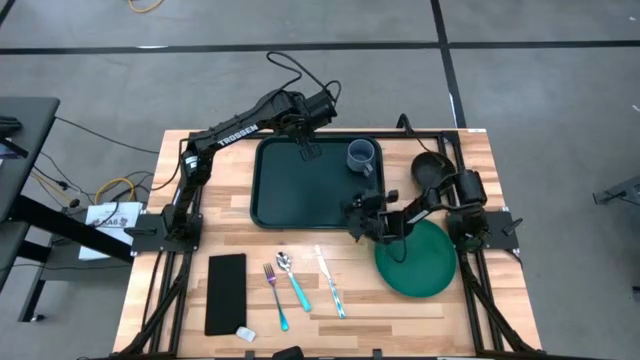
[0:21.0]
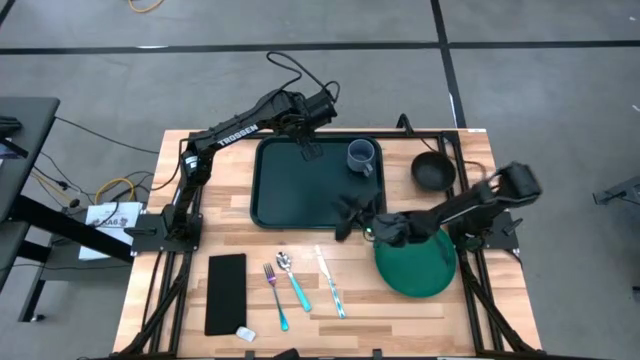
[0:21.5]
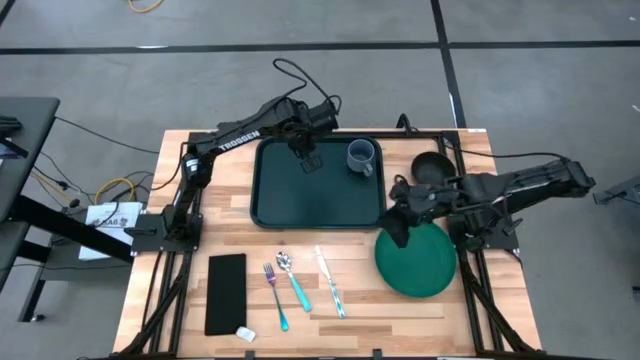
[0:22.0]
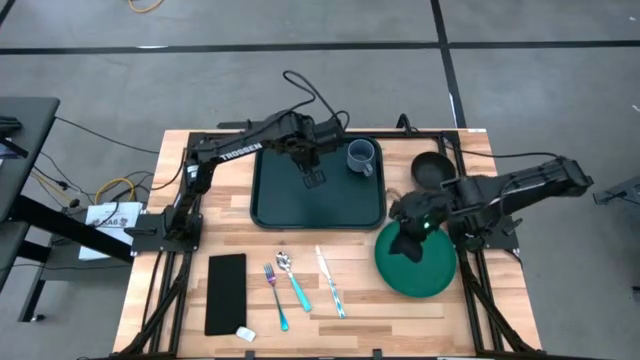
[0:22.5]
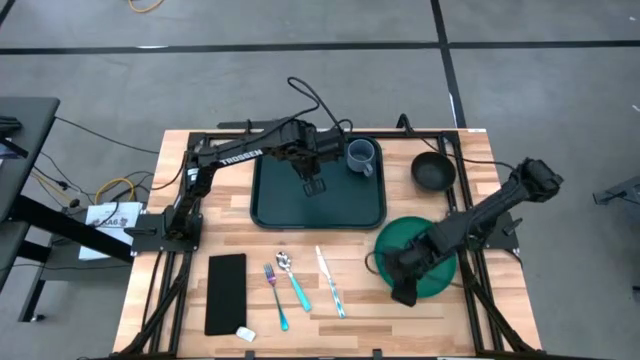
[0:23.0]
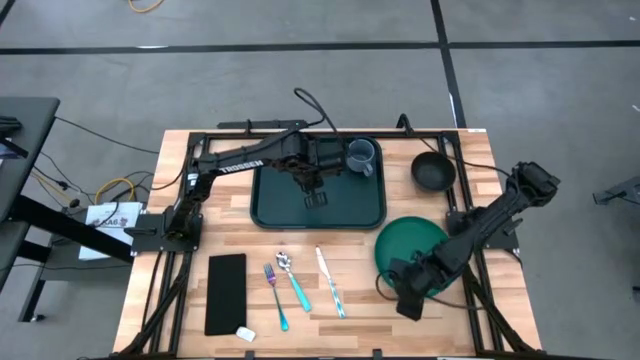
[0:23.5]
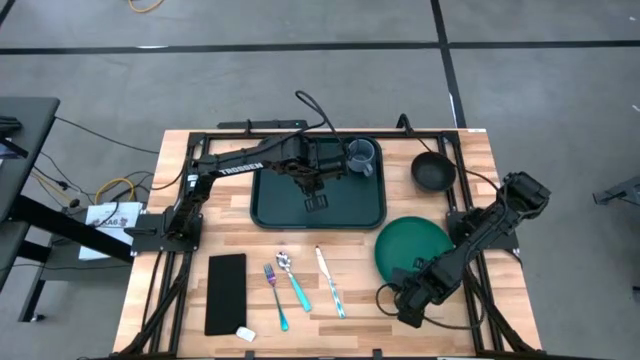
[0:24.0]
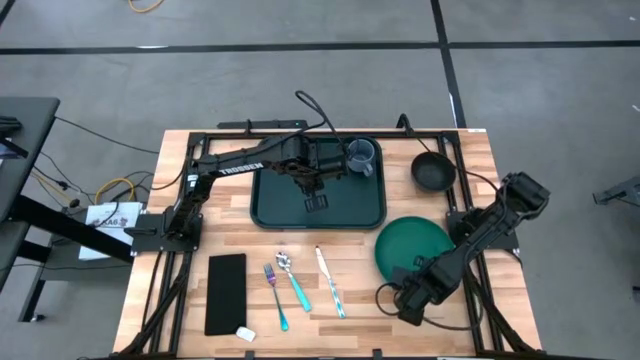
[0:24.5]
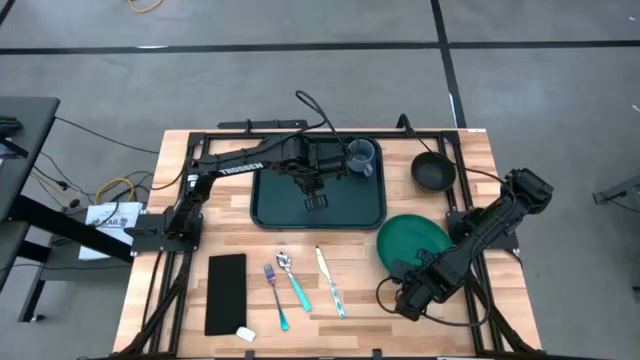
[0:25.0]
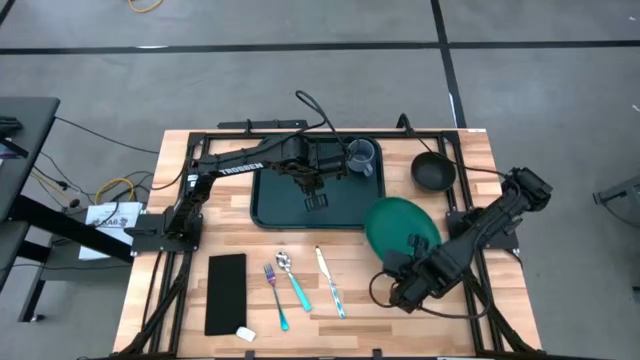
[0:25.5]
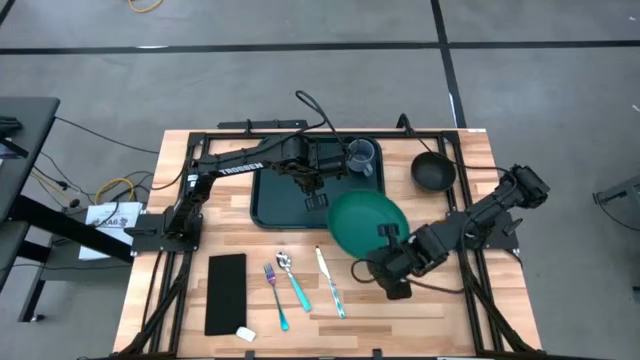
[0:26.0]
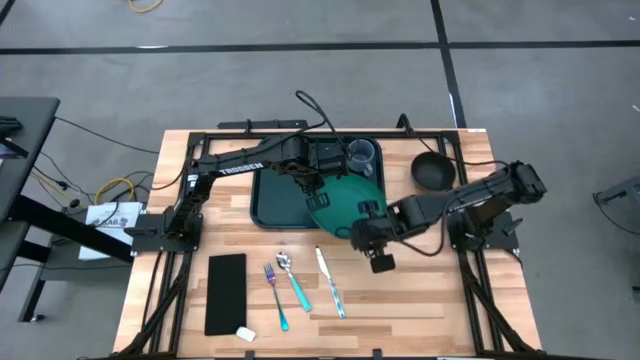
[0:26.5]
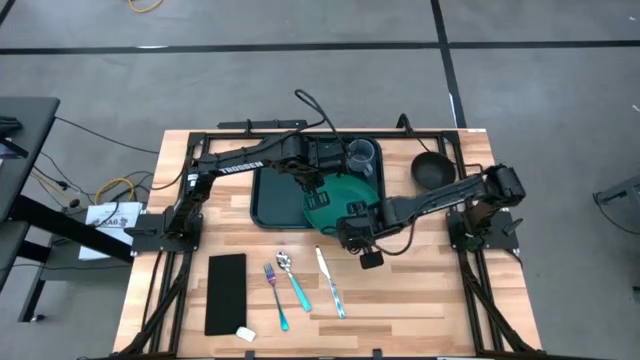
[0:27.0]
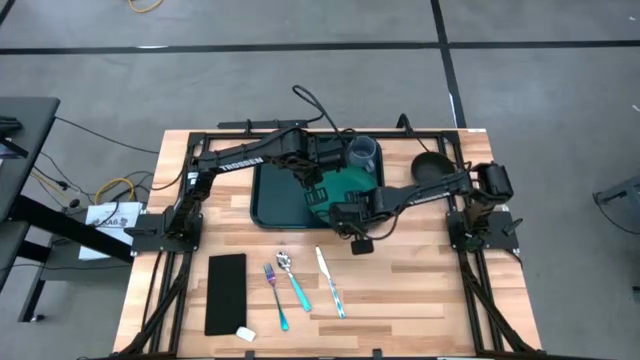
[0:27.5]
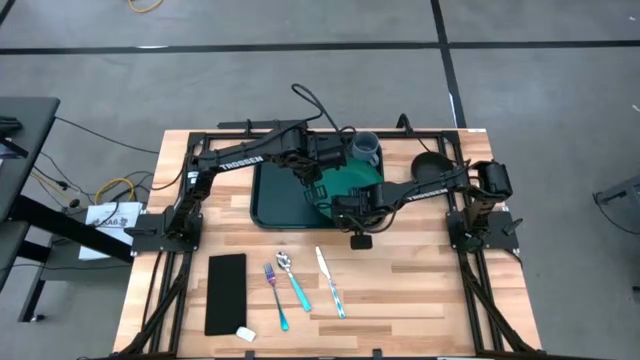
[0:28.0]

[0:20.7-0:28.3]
Task: Set up tray
Put the green plate on the black tray below the gray mug

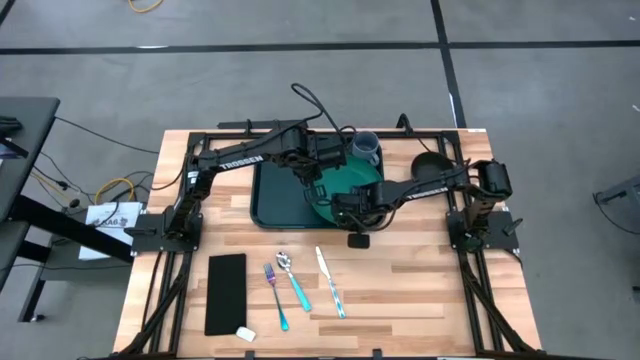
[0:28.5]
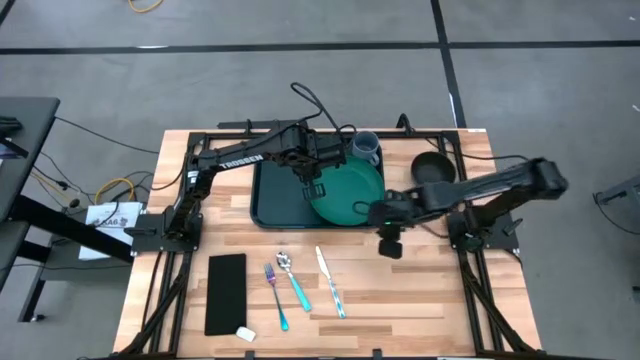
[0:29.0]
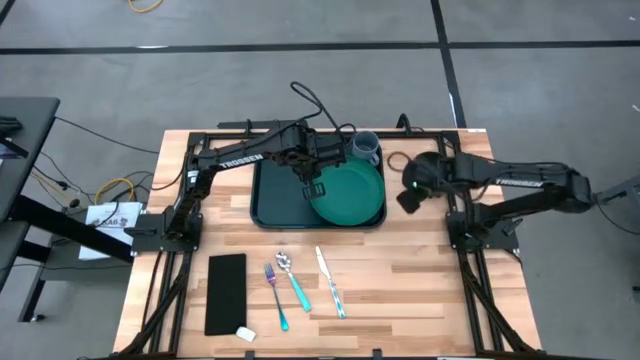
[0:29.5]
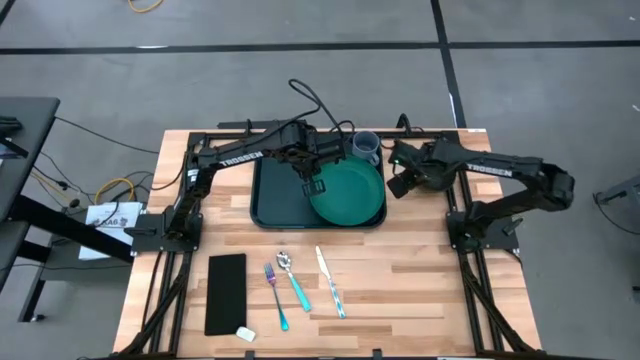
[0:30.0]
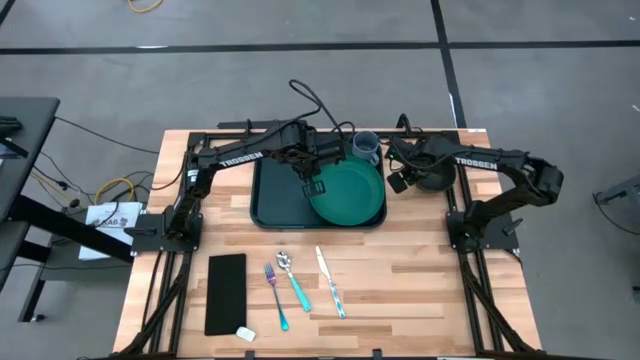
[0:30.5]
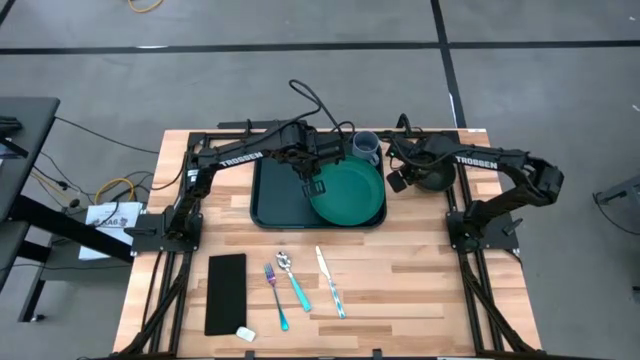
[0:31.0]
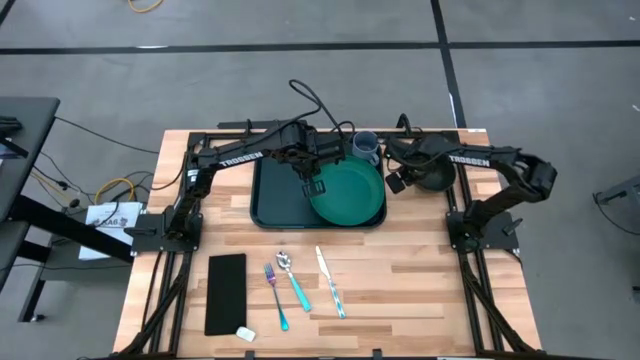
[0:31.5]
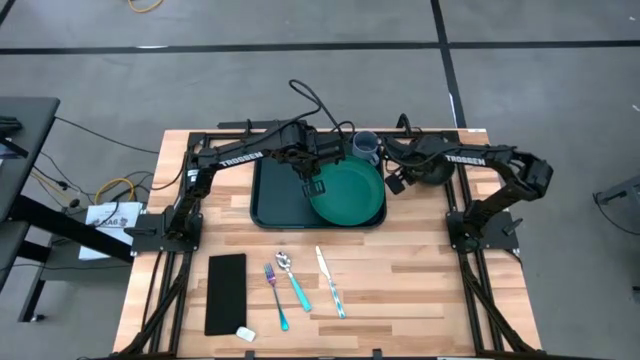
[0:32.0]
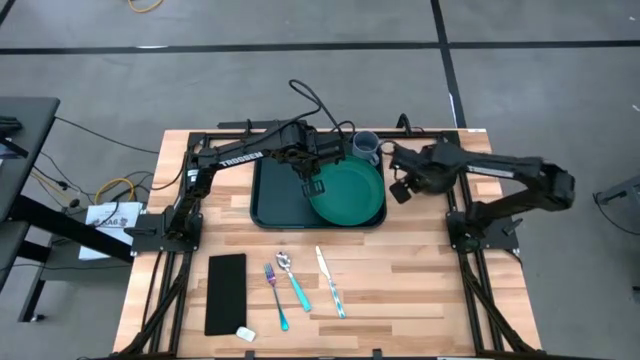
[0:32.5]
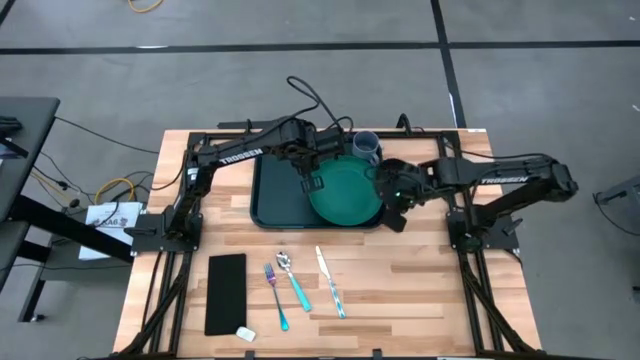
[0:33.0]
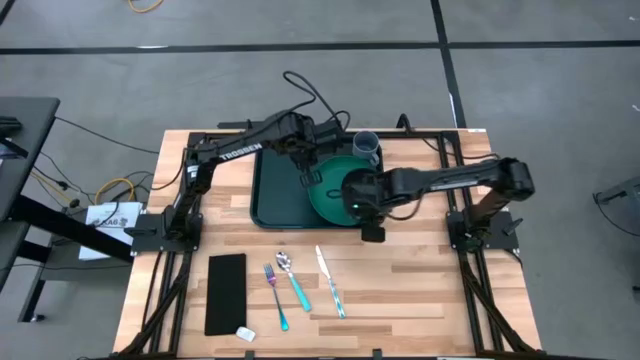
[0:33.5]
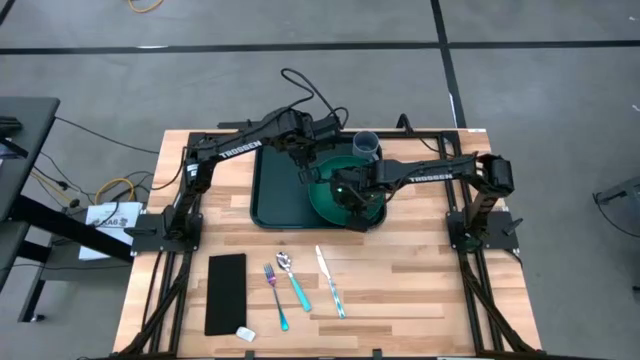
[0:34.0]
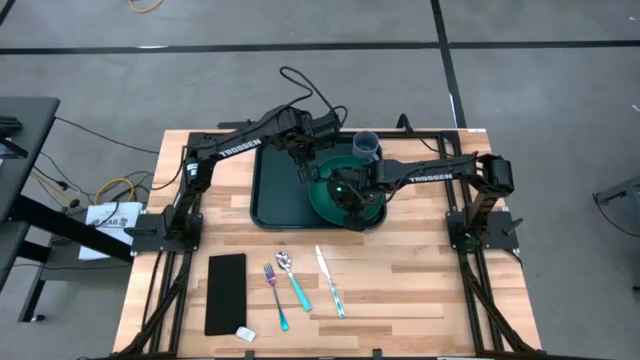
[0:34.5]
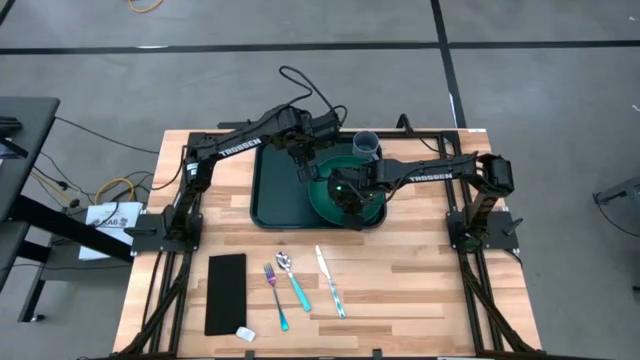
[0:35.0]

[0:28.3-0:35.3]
Put the black bowl on the green plate

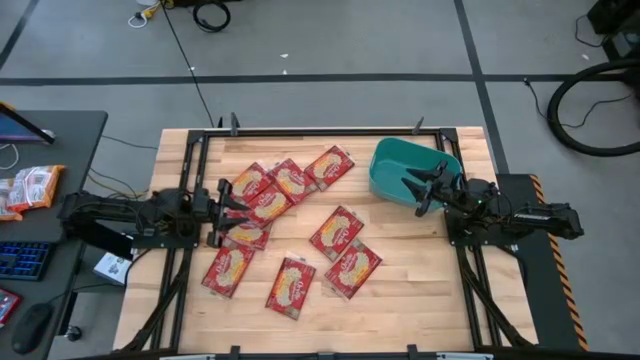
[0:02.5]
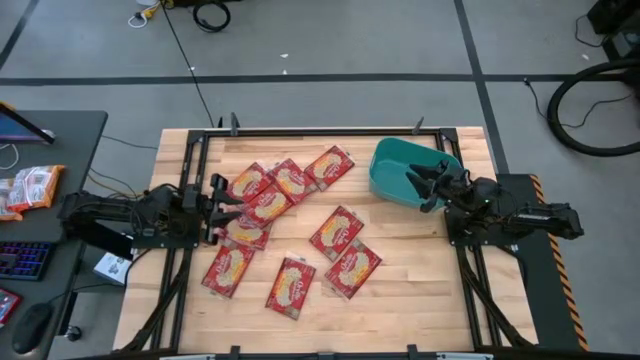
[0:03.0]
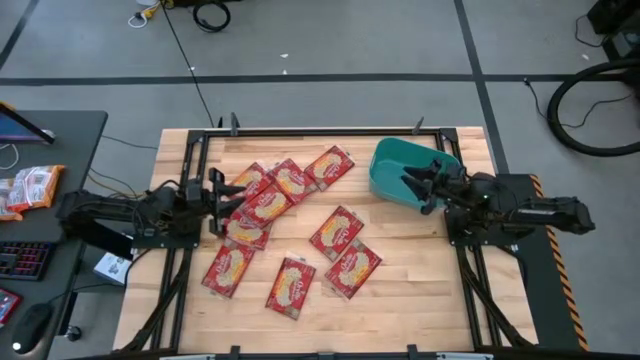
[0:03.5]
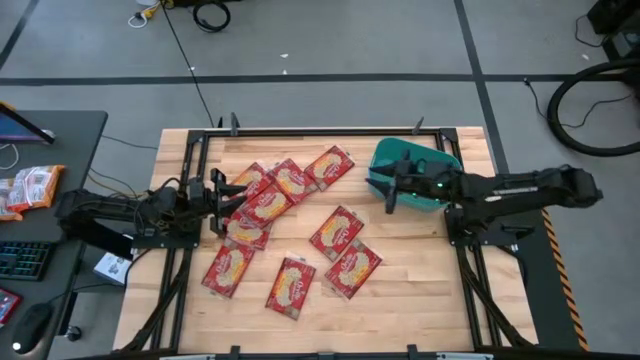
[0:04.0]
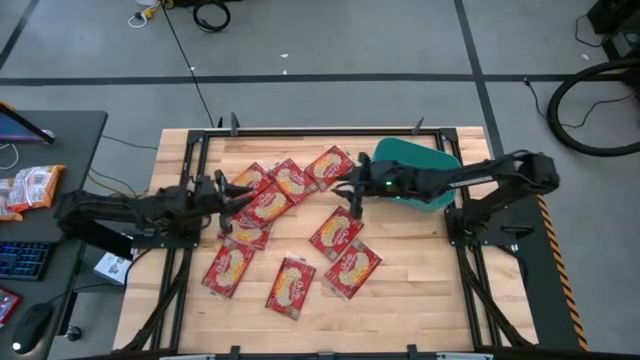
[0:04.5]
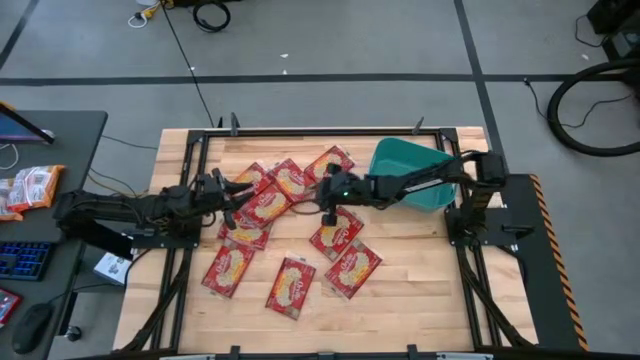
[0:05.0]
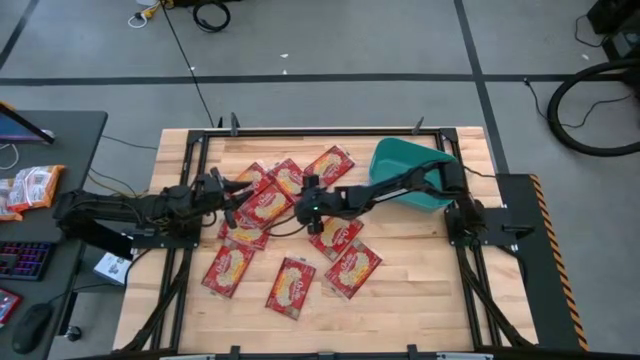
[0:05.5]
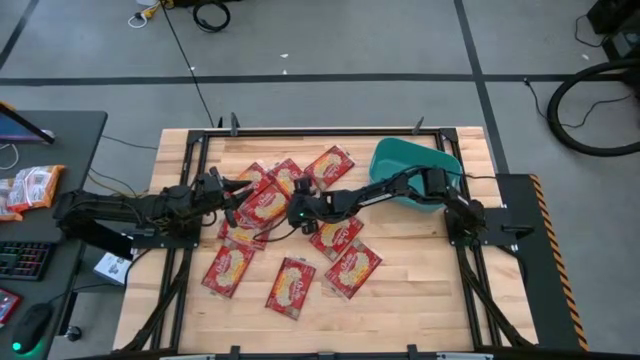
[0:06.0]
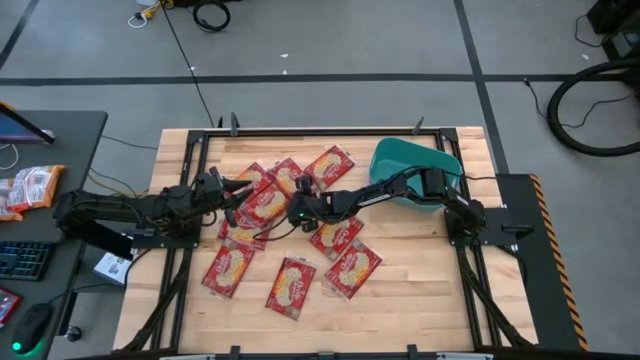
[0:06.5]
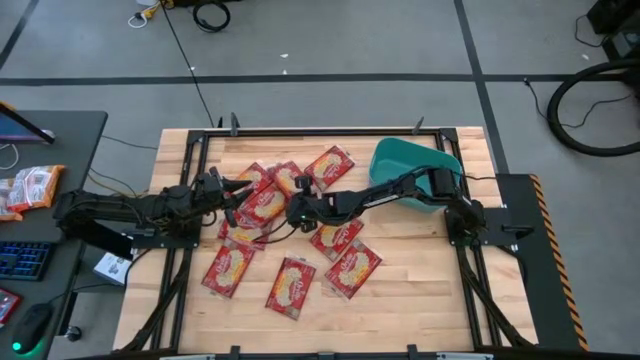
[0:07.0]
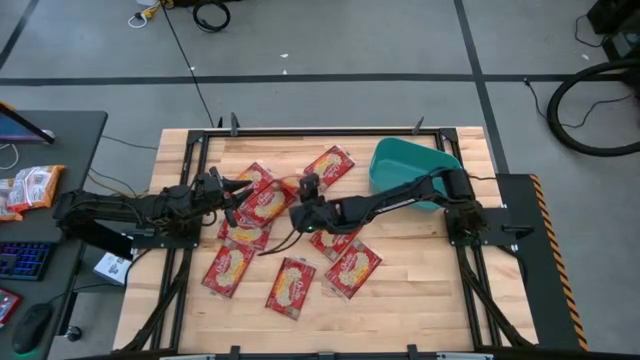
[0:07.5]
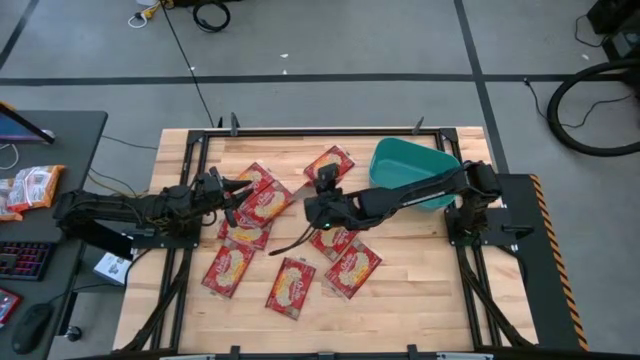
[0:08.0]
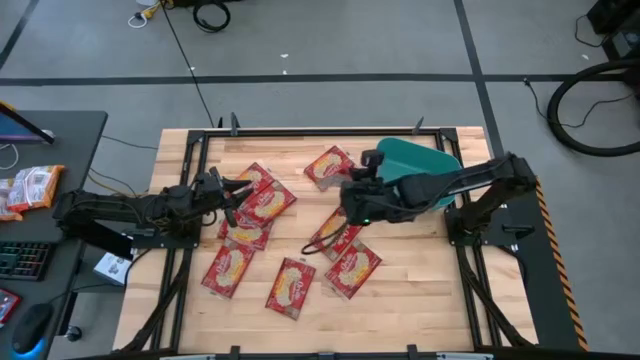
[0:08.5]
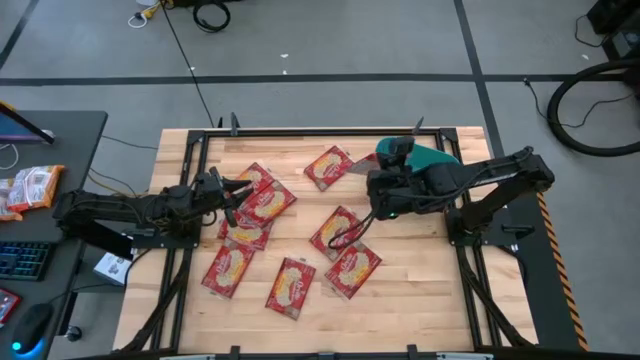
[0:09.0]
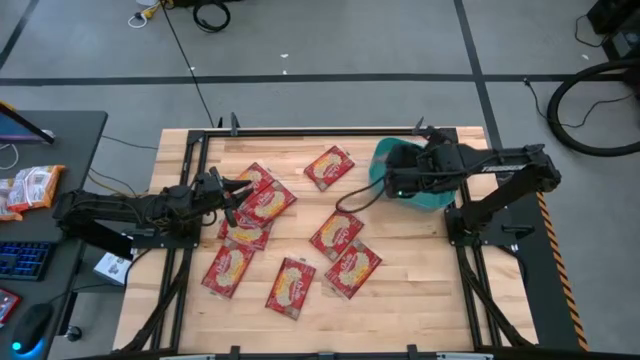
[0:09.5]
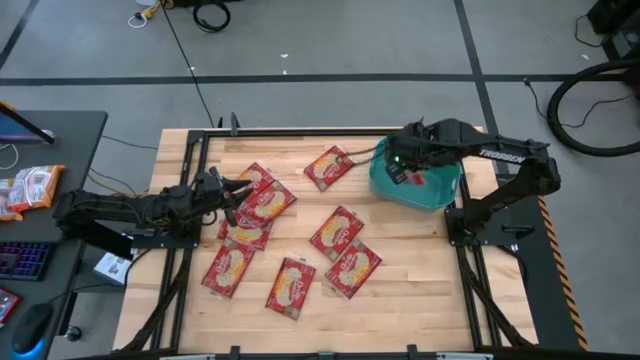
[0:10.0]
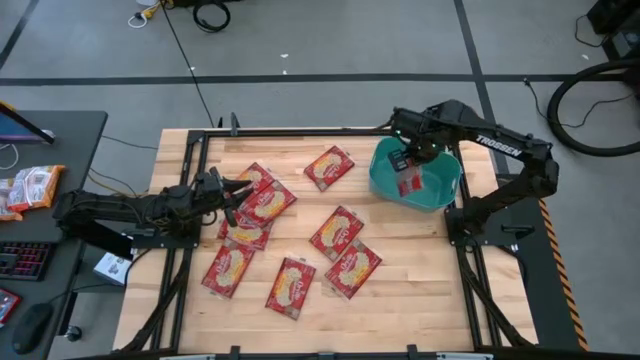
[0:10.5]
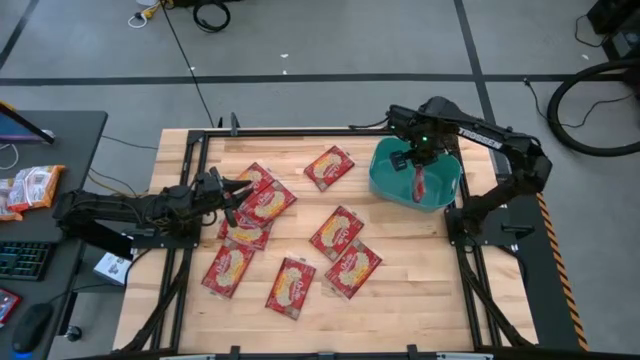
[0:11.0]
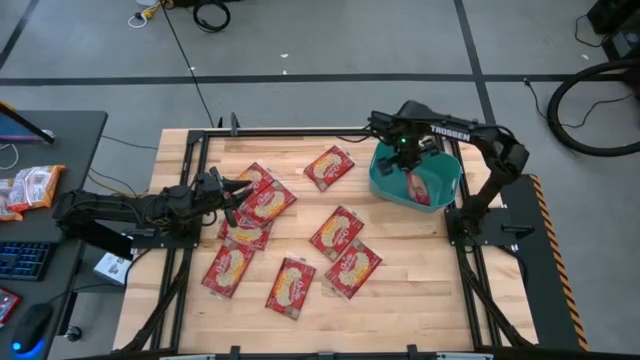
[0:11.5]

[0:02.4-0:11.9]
Task: Sort popcorn bags into baskets
Put the red popcorn bag into the green container
